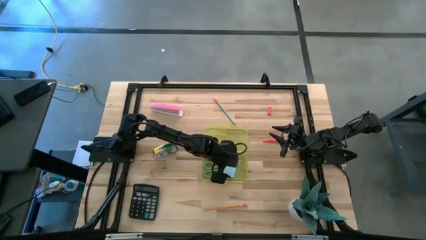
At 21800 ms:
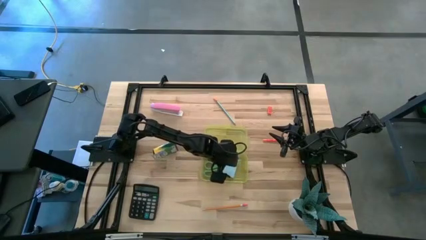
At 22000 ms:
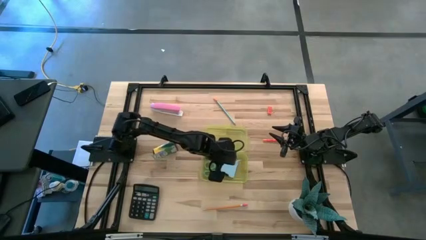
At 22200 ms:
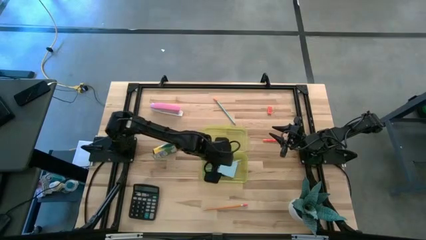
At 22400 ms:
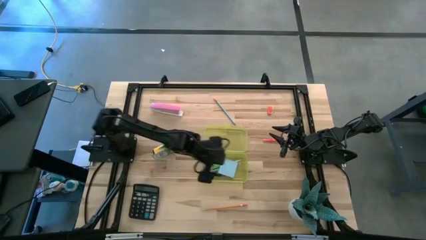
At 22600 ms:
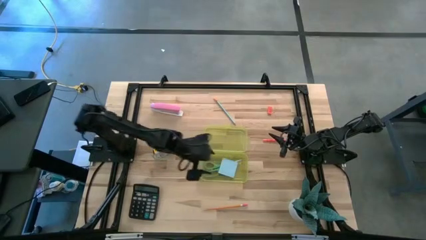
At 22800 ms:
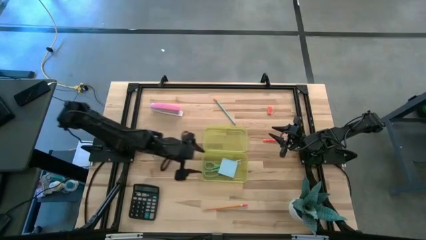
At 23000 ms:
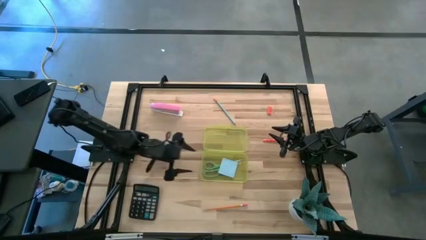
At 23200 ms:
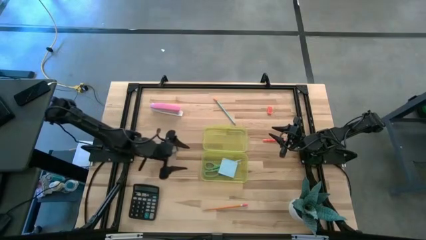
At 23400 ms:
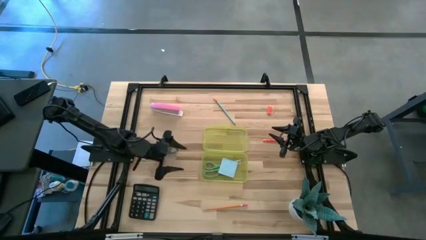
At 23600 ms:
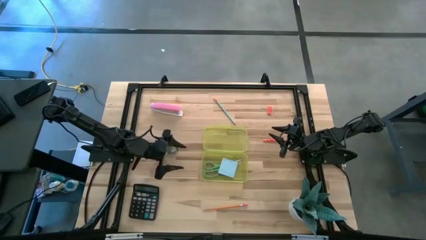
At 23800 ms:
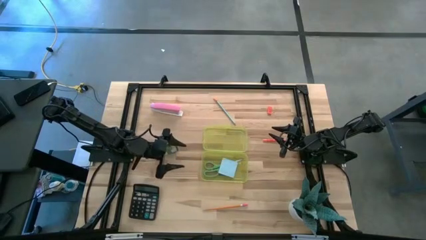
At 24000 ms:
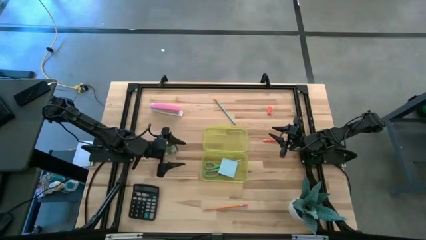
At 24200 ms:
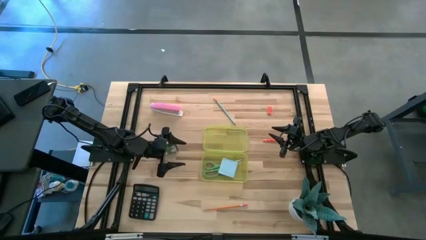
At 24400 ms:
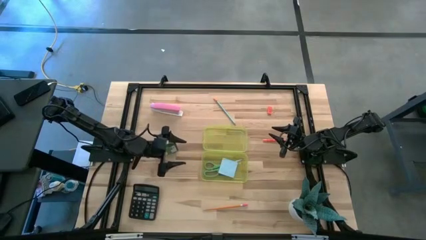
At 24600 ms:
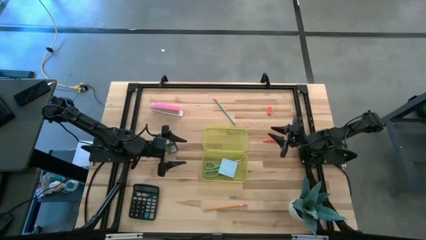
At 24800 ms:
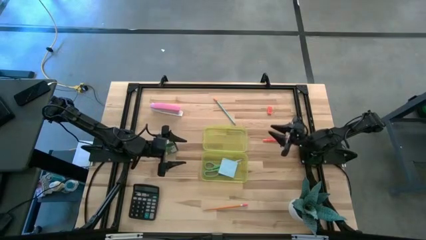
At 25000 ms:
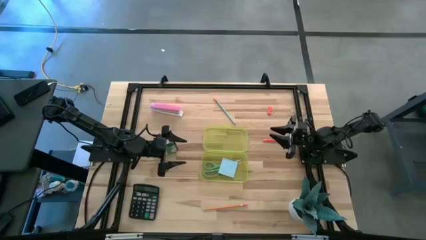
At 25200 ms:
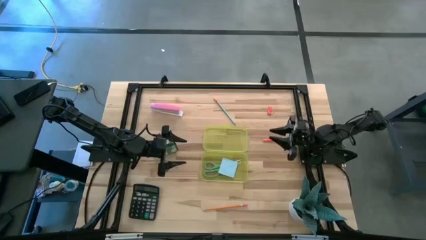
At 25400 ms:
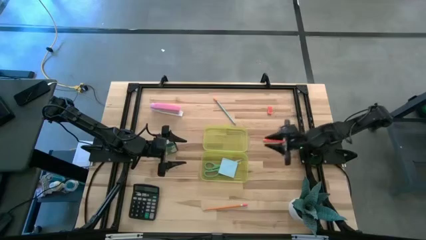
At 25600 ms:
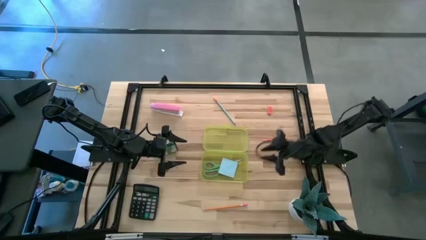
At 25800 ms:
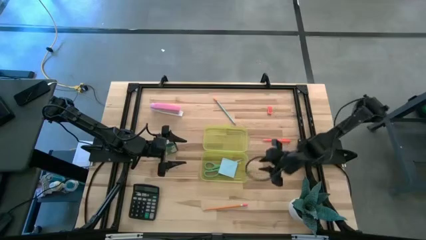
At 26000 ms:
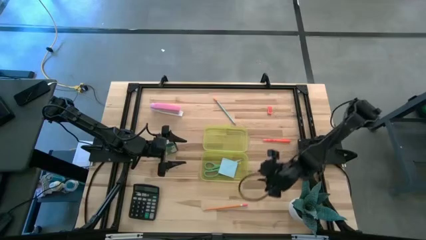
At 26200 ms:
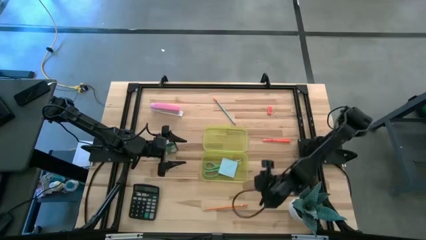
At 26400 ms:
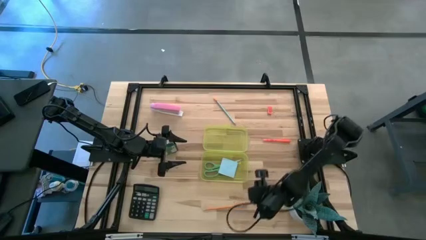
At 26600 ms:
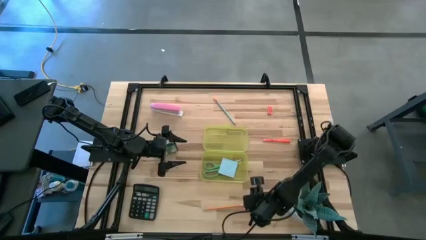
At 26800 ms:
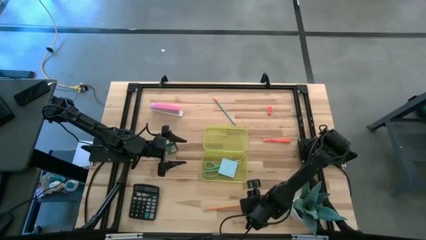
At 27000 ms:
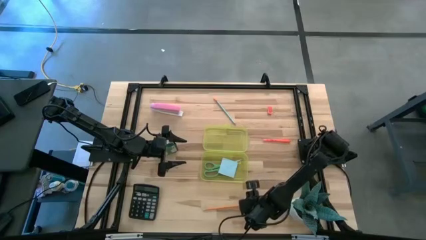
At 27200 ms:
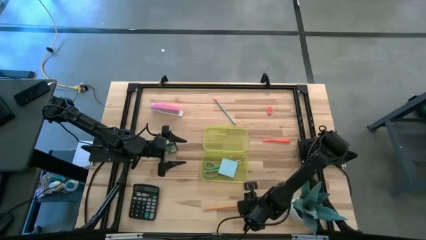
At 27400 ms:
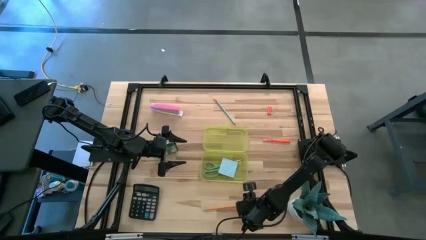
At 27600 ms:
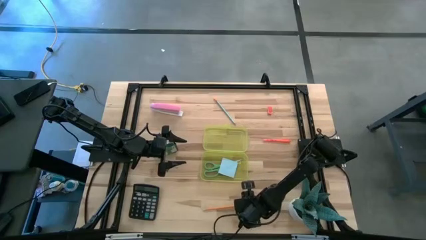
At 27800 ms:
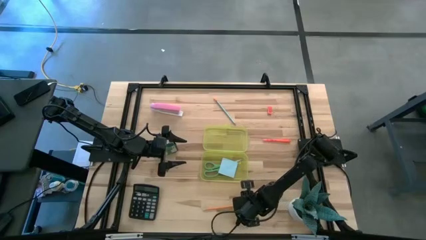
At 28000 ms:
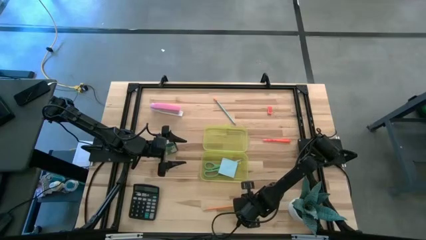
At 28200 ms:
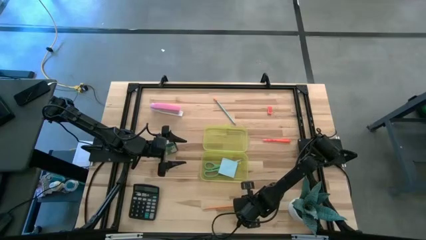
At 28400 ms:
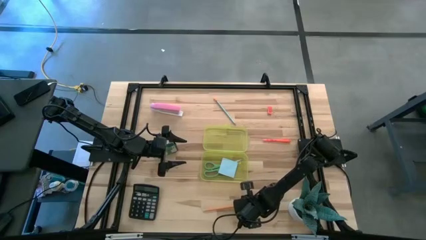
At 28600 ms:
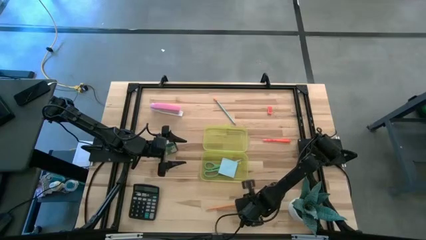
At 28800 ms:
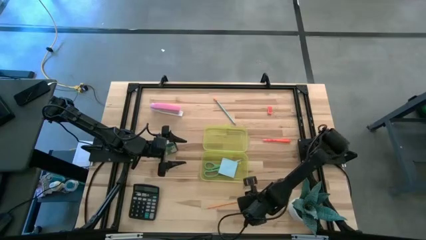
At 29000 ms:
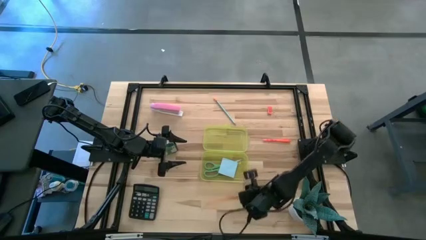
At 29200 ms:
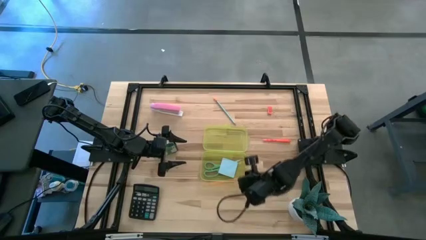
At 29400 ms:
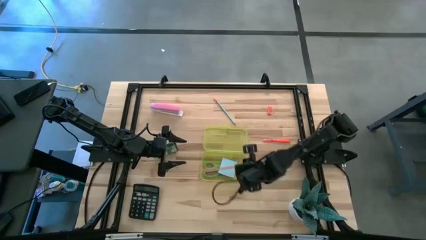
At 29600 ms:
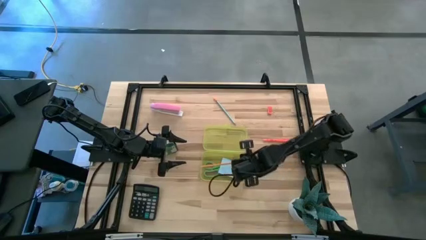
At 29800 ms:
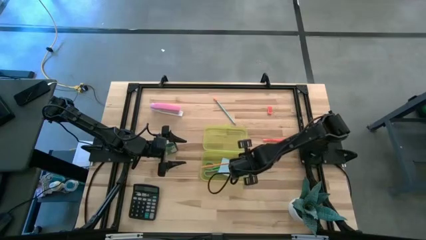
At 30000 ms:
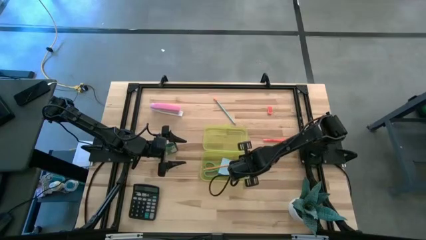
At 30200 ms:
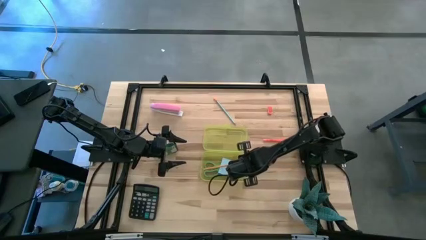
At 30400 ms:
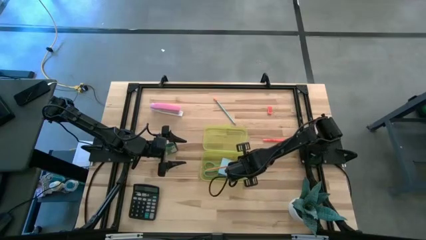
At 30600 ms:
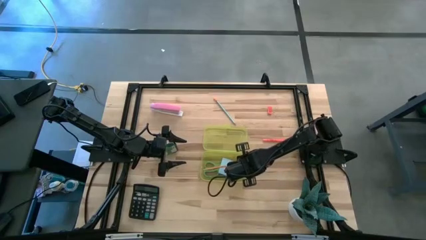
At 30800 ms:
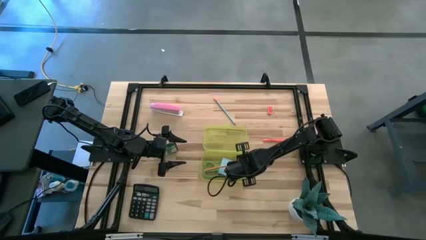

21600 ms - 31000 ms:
Task: Pack school essentials
Put the yellow pencil into the supply box

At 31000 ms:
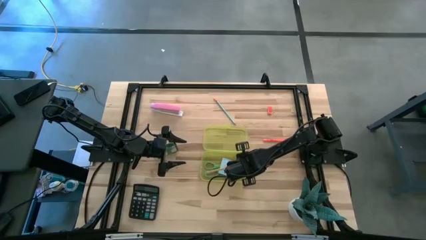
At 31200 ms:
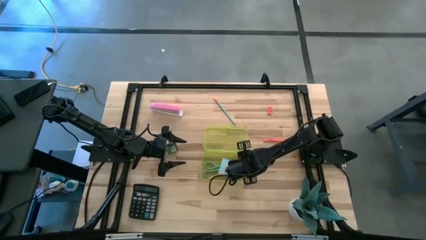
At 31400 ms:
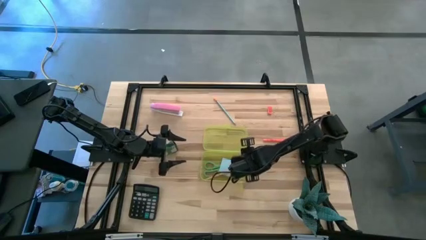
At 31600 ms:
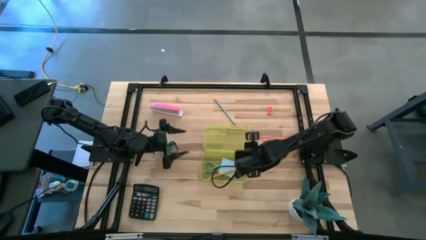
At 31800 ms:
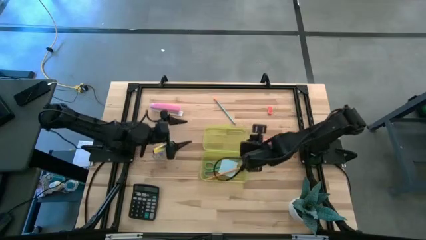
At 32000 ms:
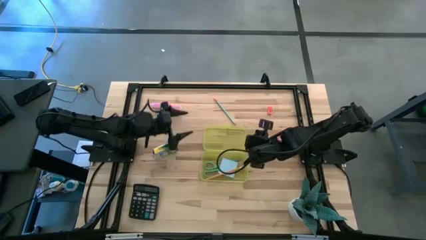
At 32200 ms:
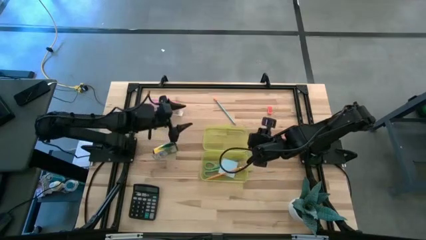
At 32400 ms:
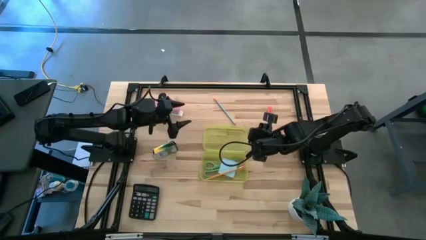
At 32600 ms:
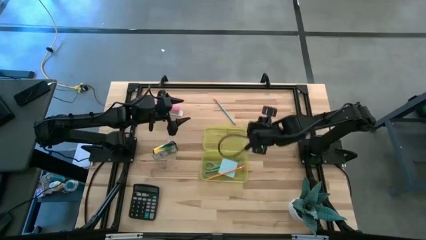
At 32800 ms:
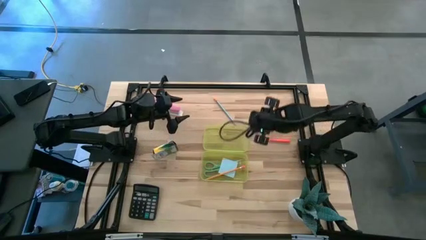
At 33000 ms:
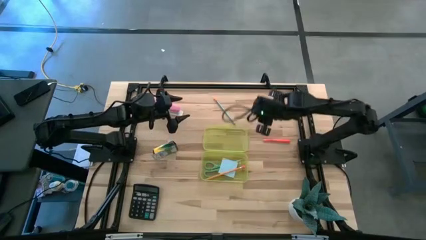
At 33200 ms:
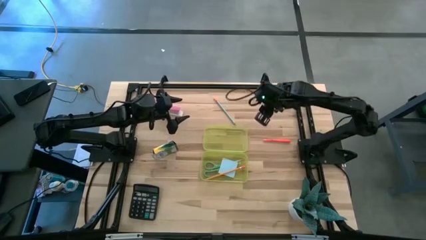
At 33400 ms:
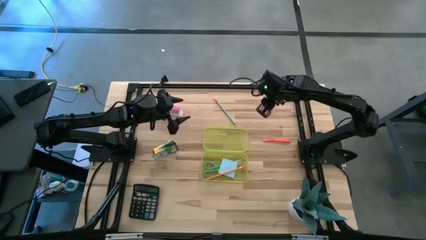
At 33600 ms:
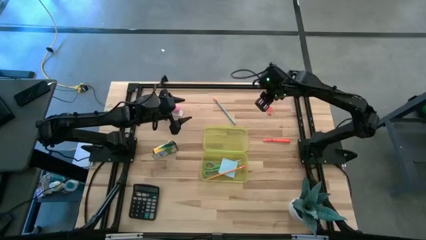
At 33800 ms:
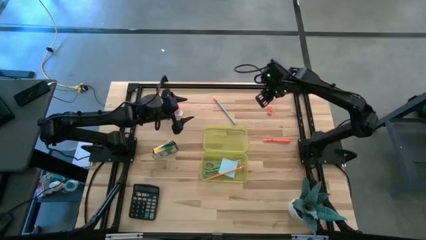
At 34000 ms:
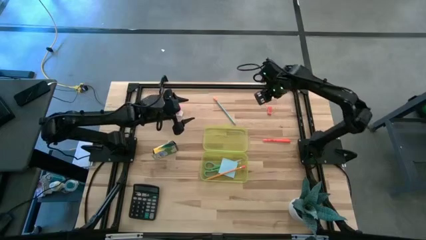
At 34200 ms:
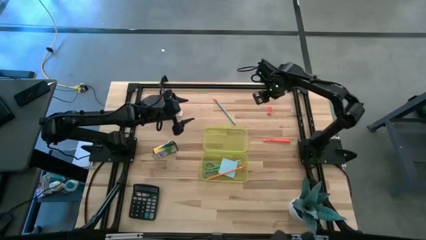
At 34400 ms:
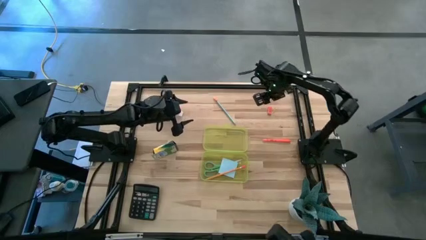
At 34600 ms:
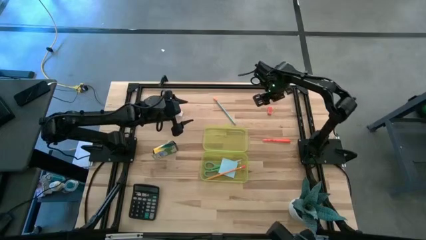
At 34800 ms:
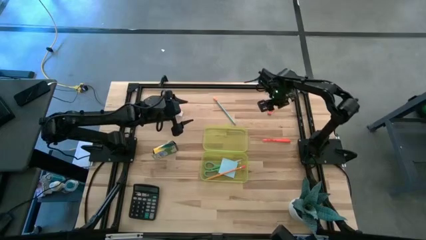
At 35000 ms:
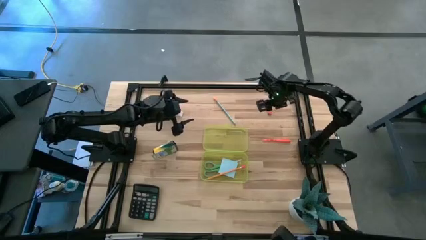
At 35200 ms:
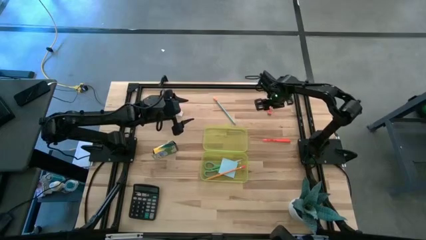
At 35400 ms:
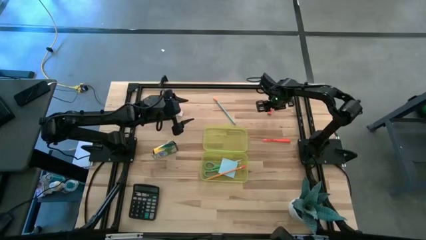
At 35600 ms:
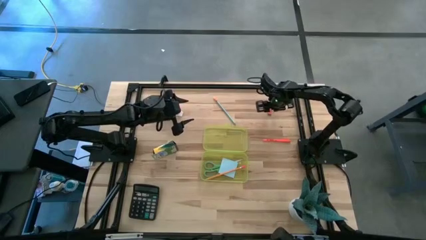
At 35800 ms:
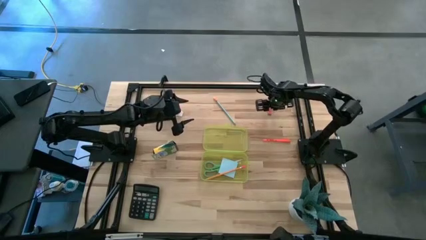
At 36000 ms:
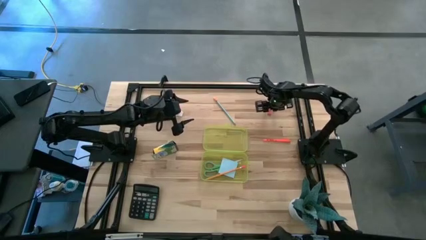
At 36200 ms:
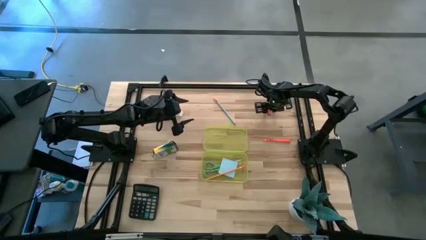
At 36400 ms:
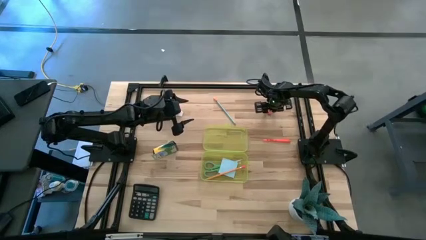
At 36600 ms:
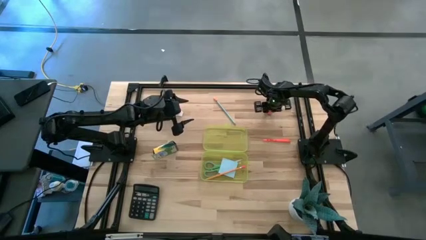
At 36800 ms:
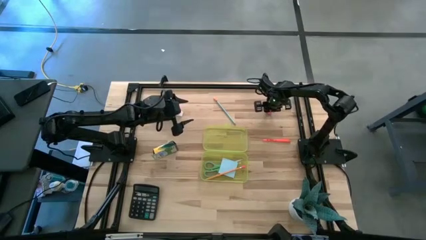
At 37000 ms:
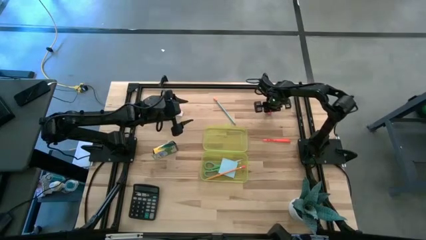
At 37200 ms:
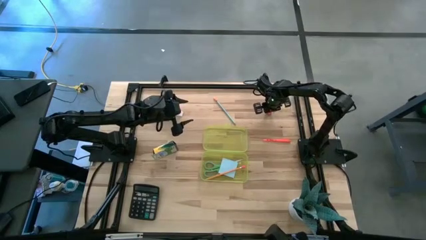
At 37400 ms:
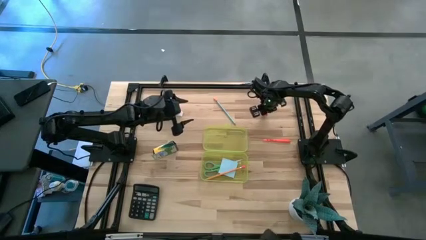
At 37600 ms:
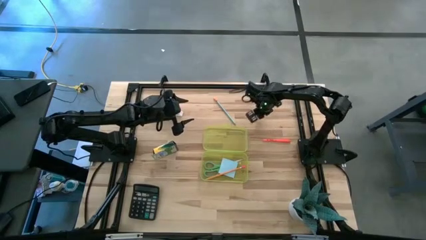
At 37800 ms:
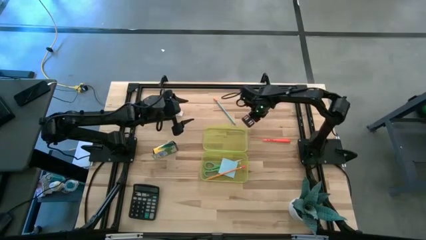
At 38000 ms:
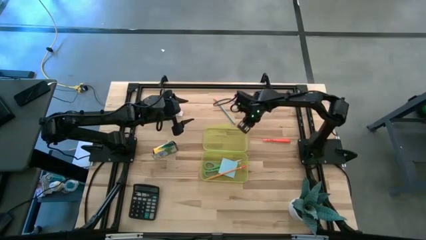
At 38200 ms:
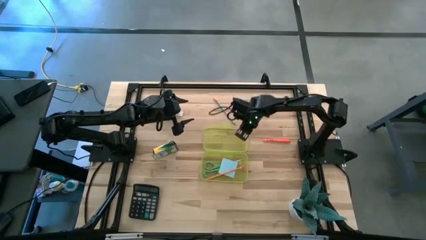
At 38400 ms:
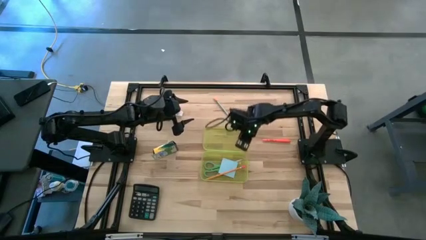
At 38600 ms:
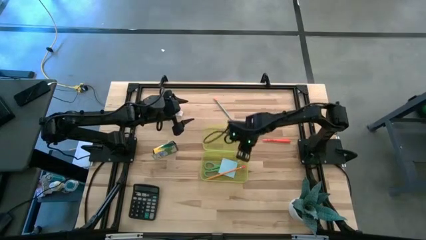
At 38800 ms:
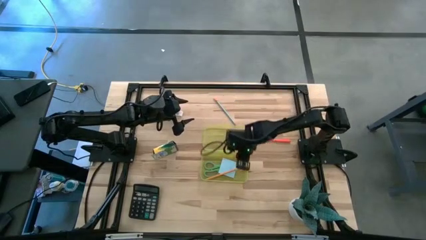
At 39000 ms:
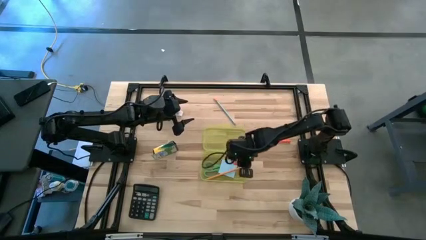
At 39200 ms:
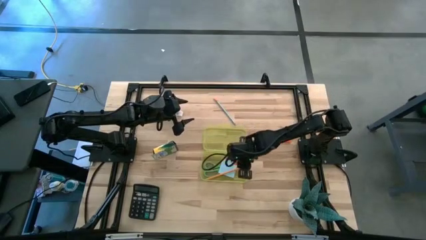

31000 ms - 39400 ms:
Put the orange eraser into the supply box
